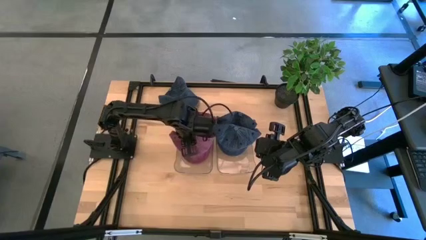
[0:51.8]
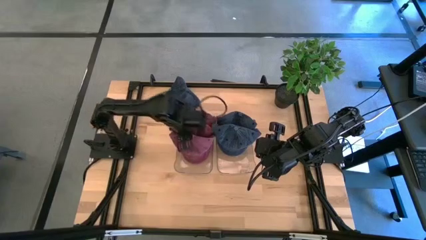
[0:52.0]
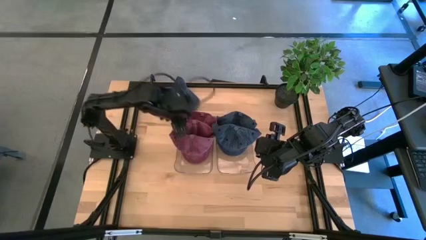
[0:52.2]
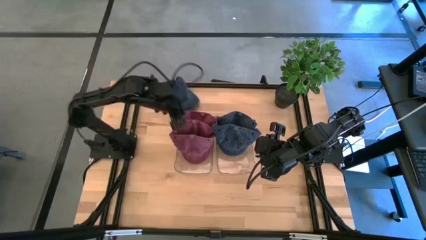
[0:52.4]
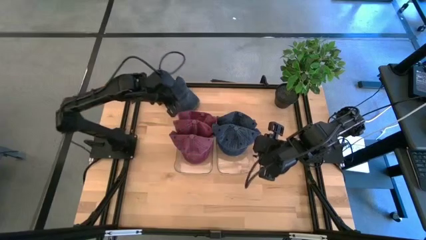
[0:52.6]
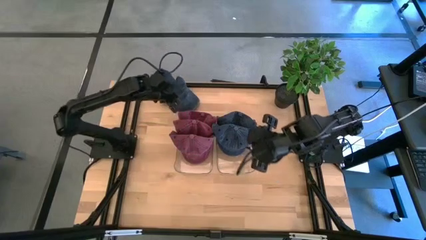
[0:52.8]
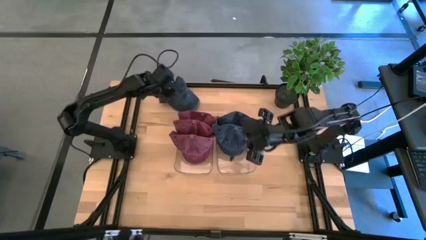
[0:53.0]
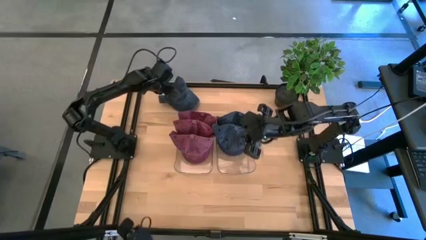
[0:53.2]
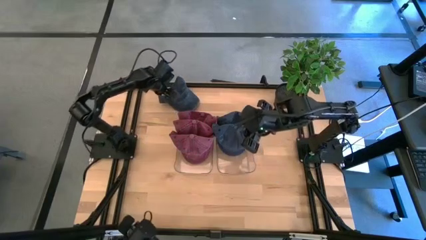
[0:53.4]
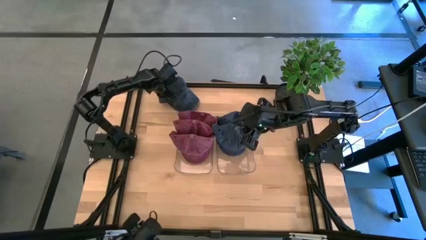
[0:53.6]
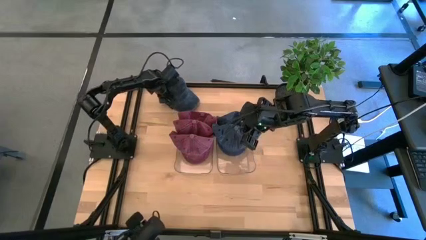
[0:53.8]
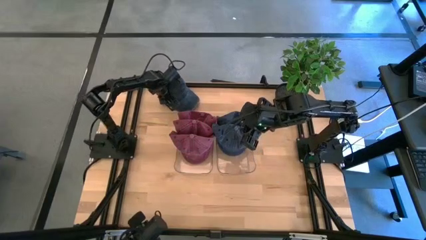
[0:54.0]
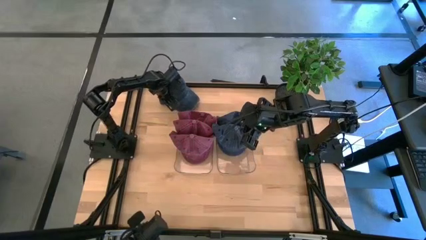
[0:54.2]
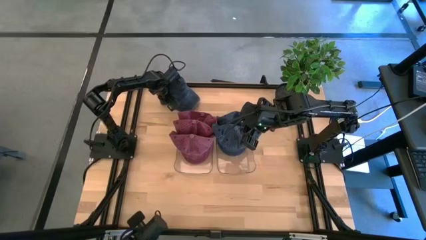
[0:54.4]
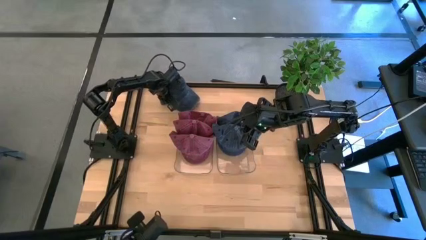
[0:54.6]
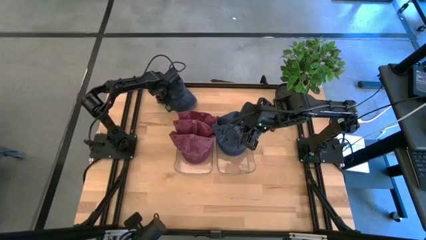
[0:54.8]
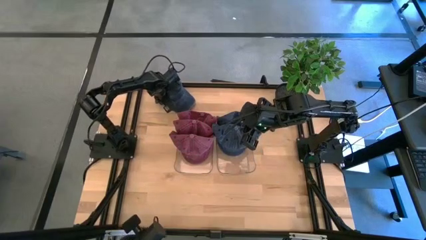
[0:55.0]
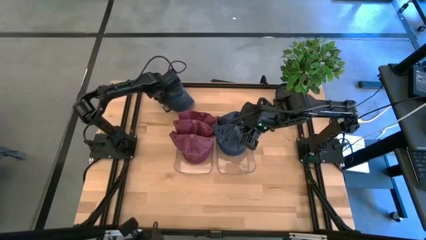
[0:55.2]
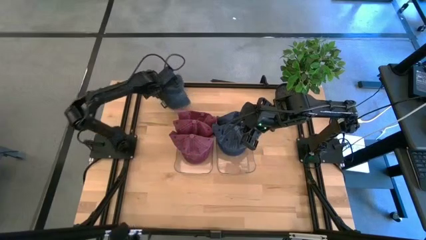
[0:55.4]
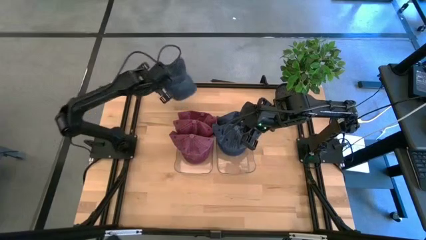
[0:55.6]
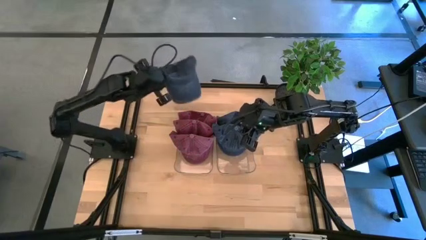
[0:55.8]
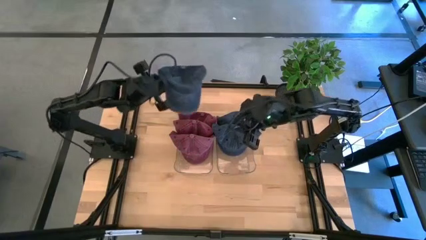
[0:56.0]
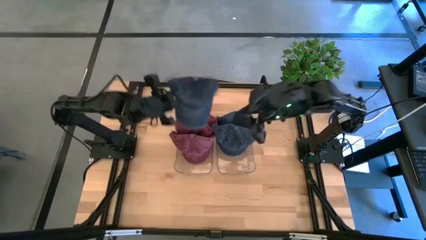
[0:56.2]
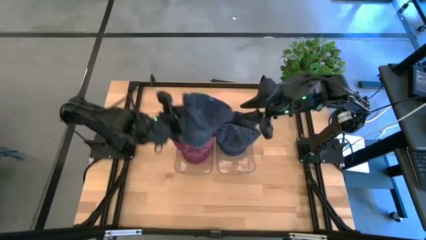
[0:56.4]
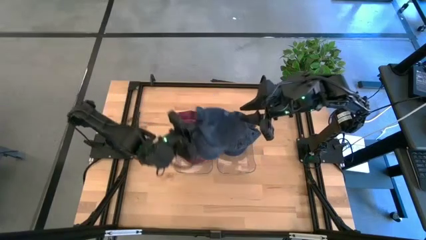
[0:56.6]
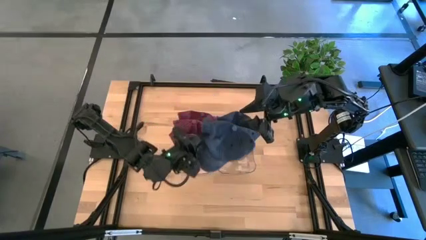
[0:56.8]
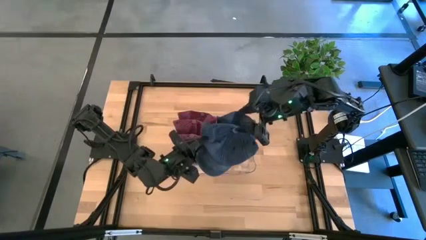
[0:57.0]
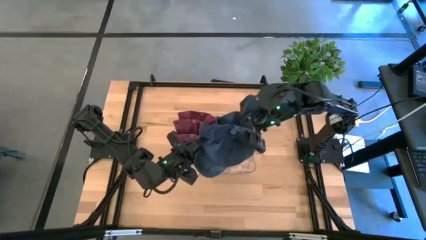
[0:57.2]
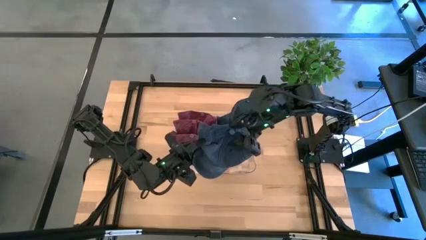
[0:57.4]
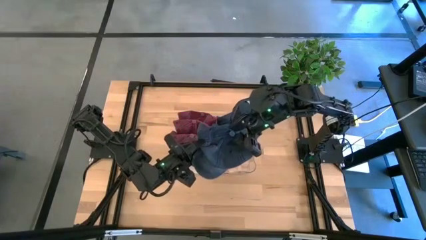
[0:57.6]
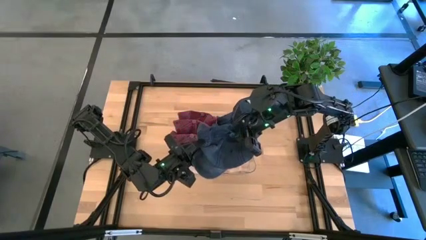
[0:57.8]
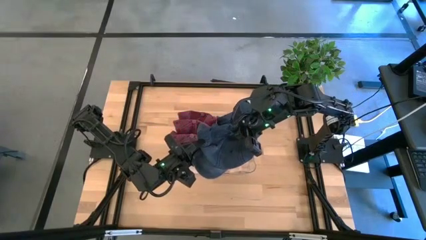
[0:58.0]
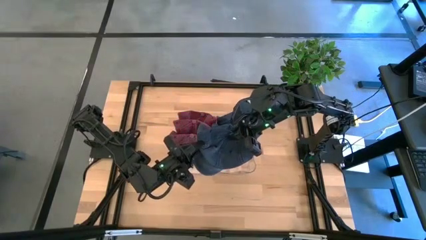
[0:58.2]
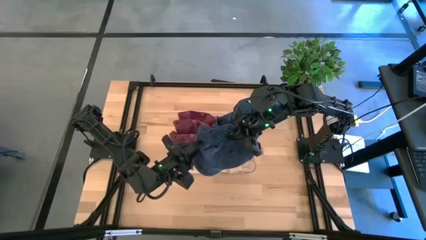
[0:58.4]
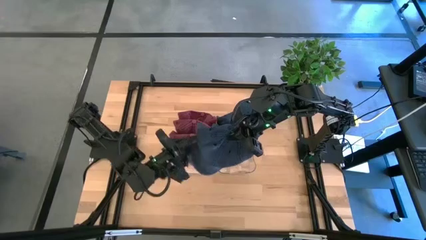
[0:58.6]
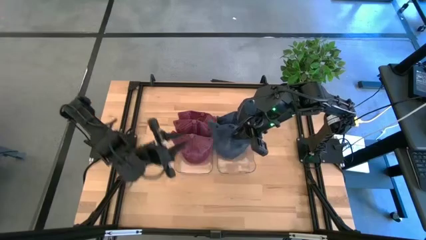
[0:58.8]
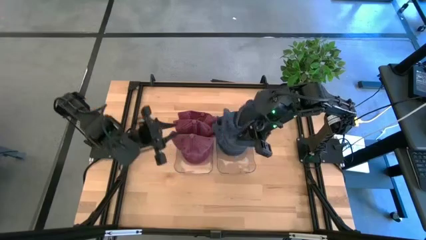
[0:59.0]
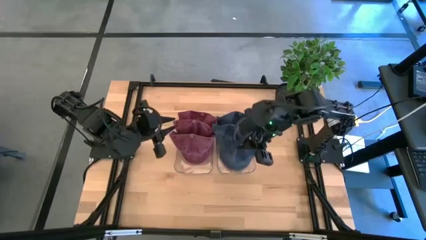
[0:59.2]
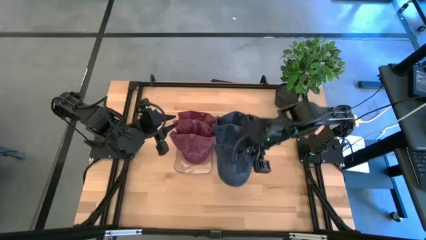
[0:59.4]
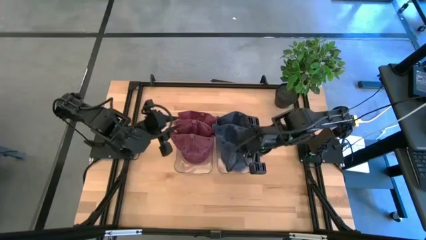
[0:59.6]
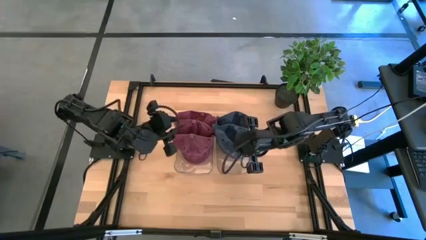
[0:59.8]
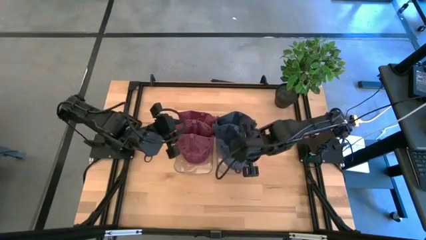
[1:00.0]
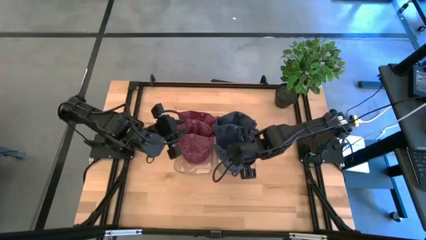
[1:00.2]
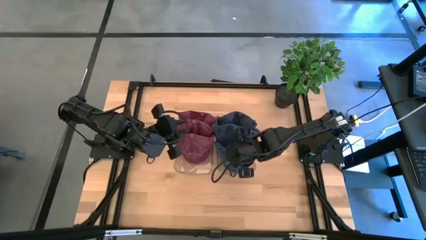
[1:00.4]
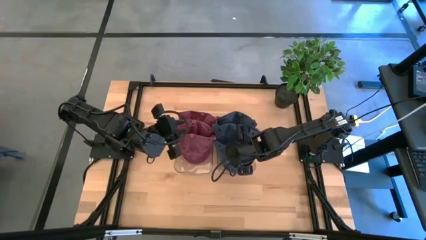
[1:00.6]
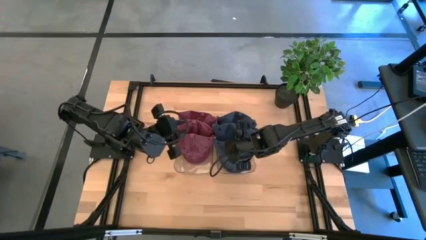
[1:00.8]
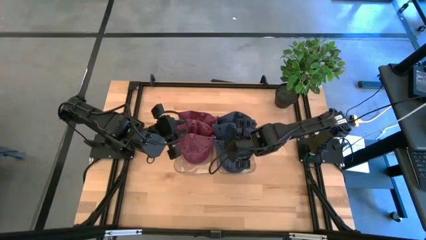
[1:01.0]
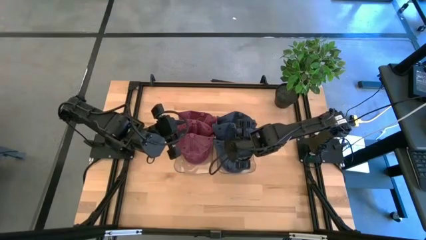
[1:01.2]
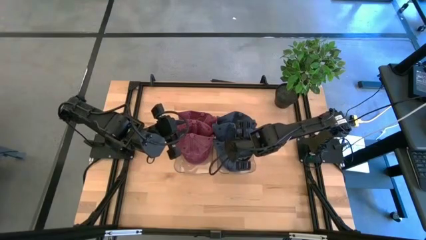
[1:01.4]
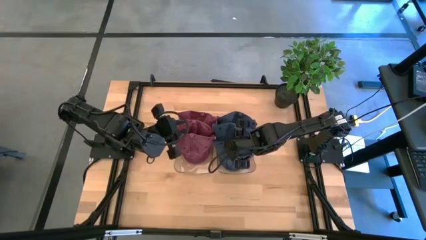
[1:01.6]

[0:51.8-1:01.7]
Task: Pick & Place hat
Put the blue cap into the right transparent bin

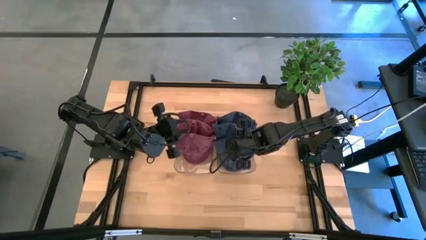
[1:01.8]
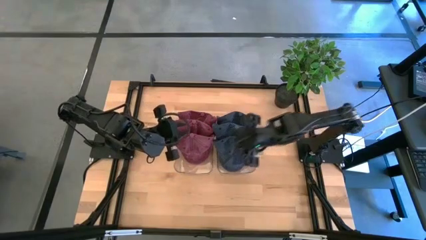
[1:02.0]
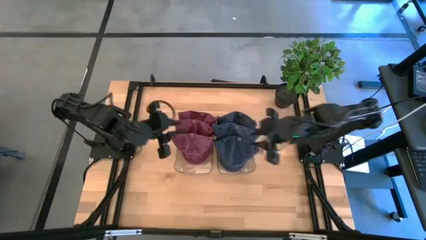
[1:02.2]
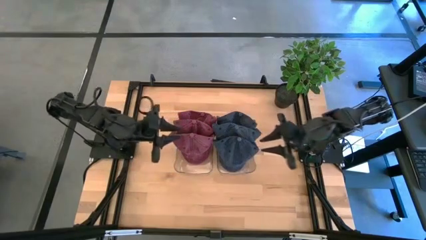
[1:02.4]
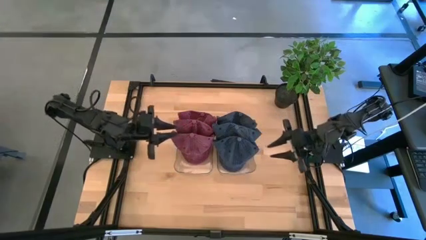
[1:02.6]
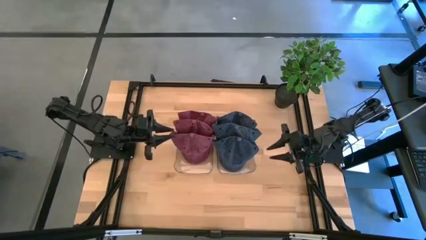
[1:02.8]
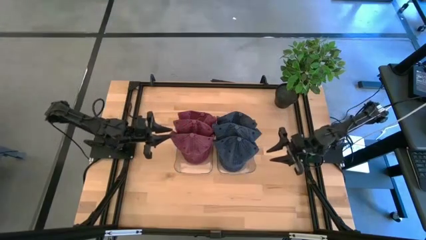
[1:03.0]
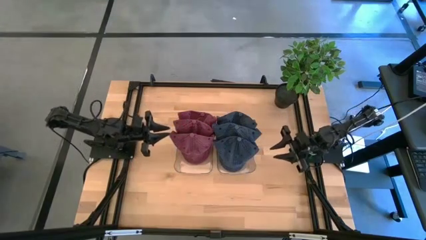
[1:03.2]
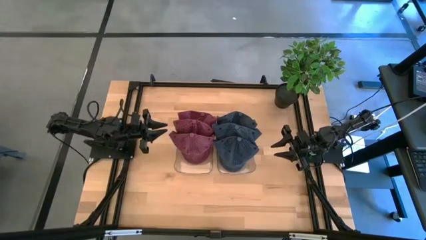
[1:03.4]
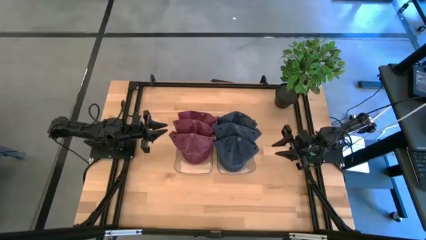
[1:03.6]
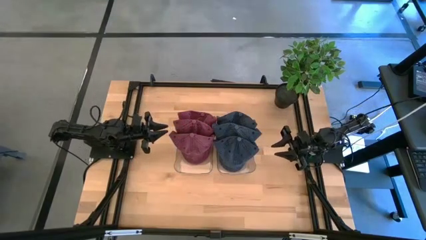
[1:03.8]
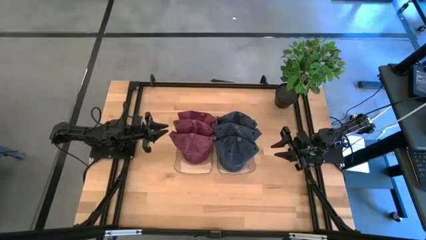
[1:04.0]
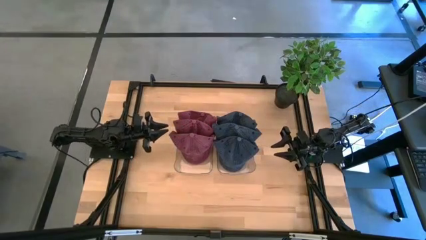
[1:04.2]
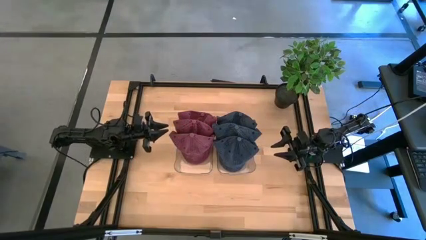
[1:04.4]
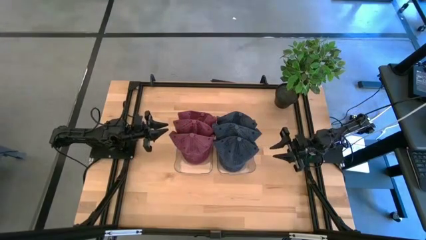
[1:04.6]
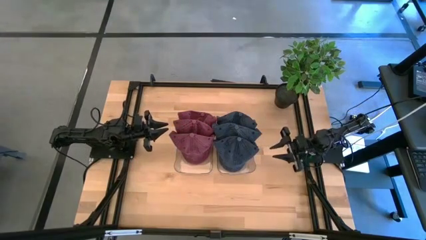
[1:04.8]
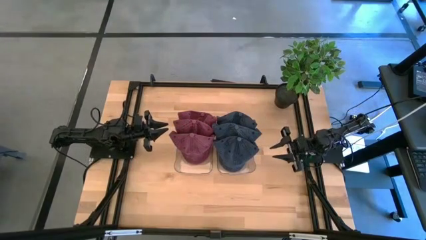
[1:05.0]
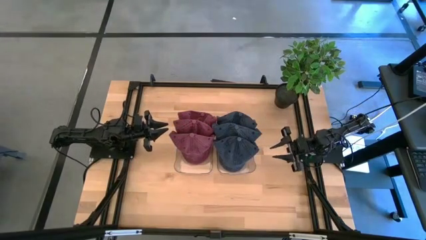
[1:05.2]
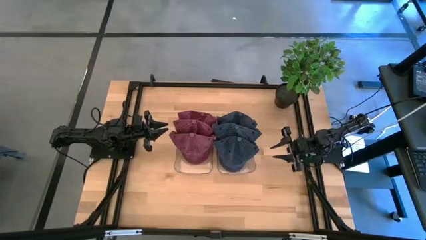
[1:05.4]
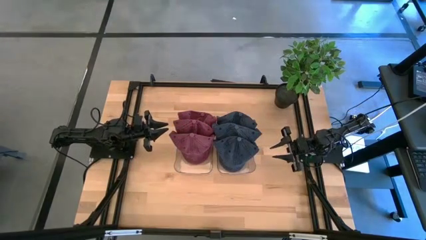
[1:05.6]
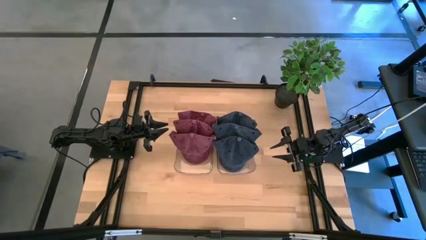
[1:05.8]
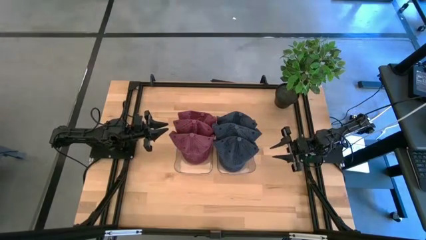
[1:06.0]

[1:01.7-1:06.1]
Return to Home Position
